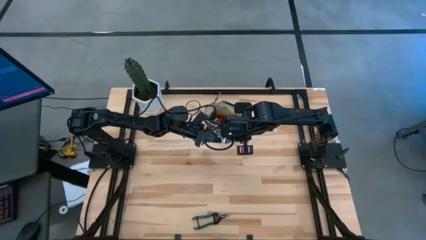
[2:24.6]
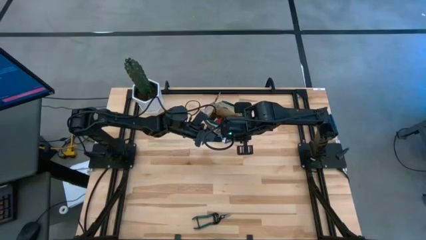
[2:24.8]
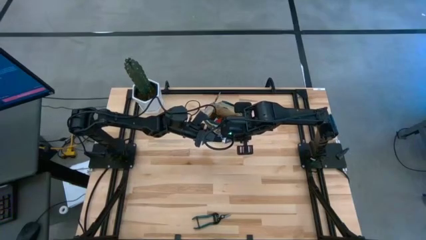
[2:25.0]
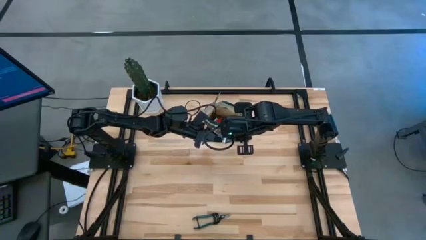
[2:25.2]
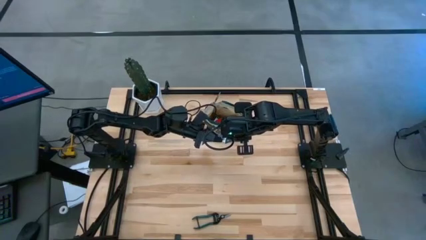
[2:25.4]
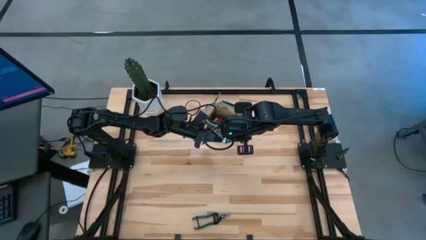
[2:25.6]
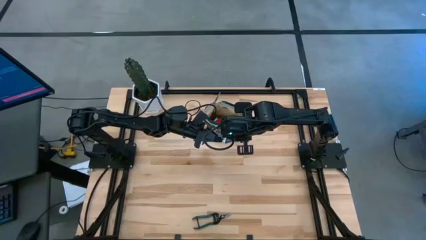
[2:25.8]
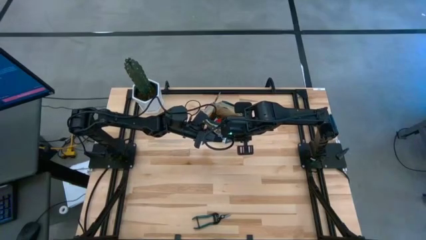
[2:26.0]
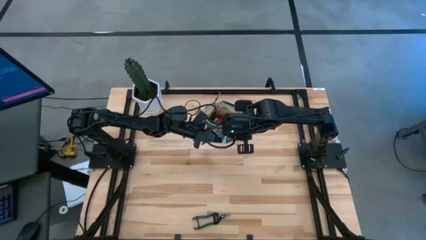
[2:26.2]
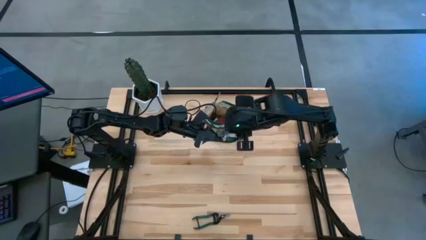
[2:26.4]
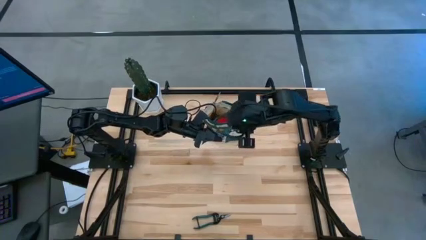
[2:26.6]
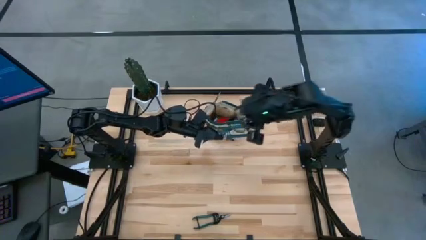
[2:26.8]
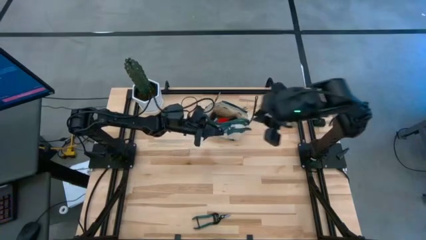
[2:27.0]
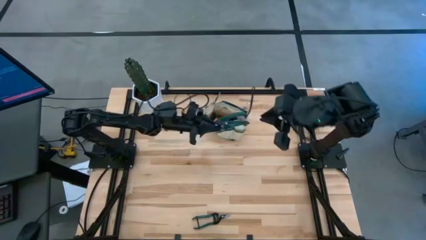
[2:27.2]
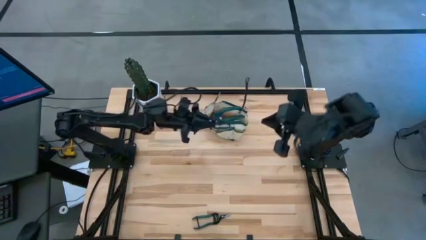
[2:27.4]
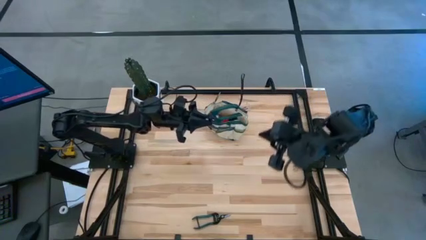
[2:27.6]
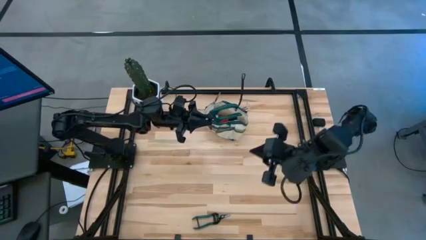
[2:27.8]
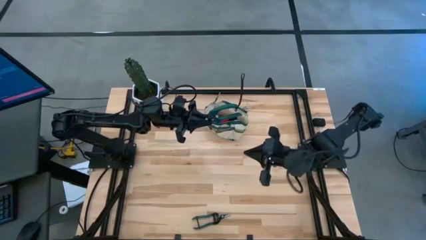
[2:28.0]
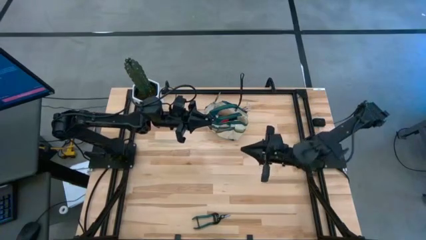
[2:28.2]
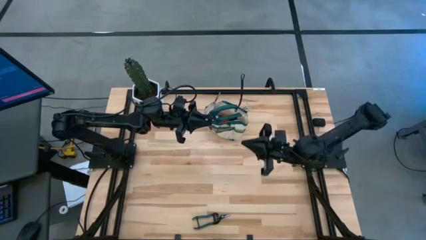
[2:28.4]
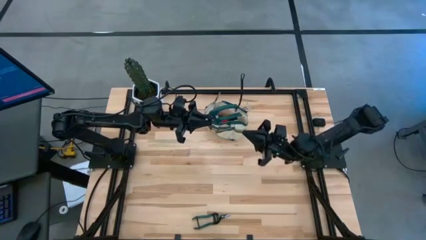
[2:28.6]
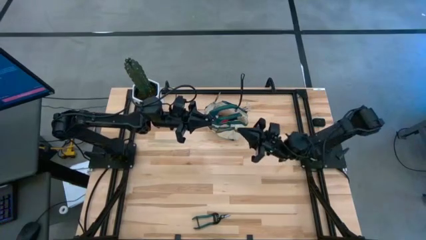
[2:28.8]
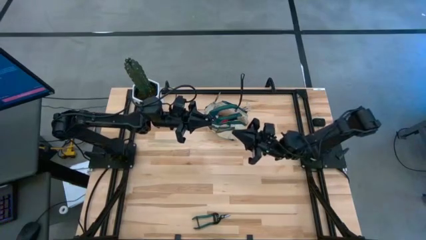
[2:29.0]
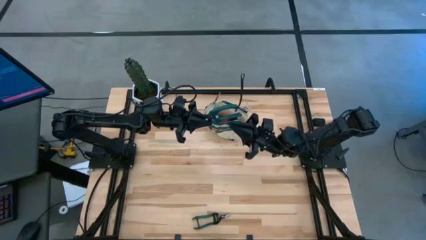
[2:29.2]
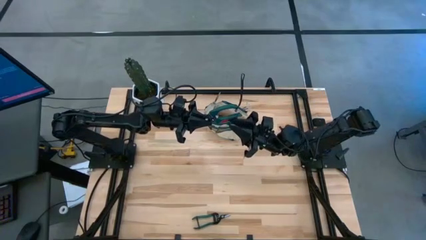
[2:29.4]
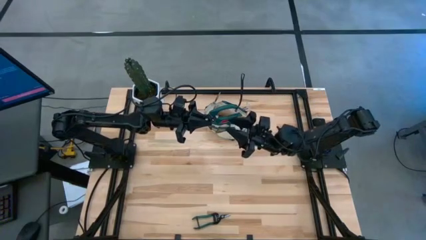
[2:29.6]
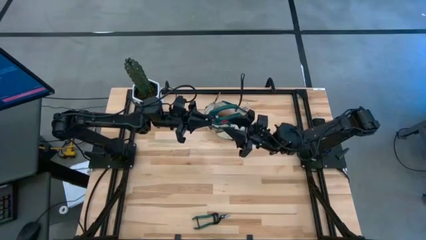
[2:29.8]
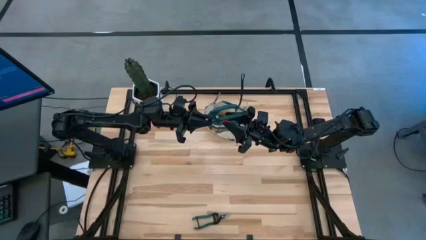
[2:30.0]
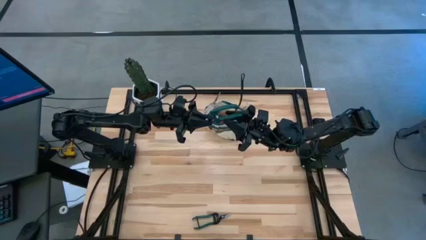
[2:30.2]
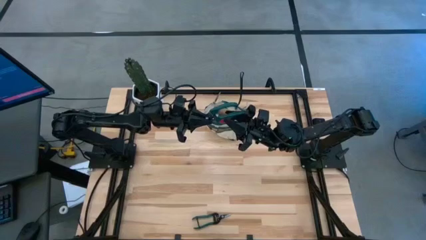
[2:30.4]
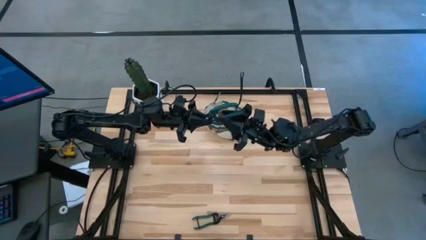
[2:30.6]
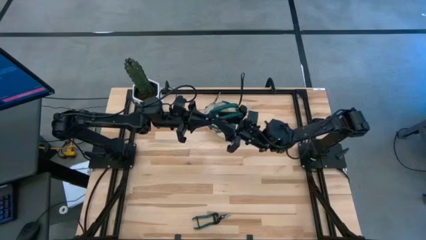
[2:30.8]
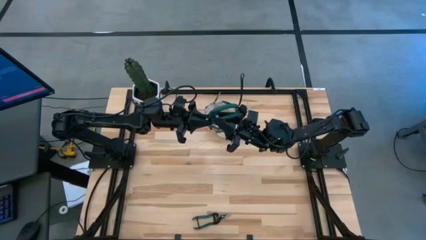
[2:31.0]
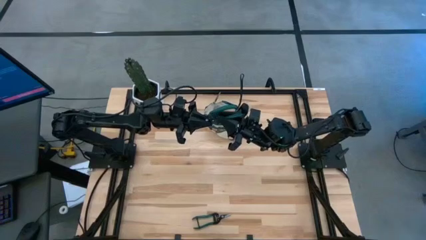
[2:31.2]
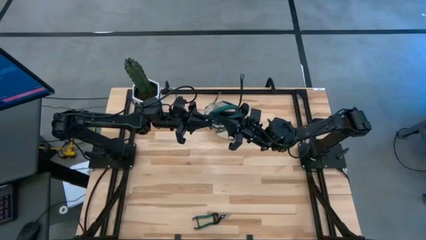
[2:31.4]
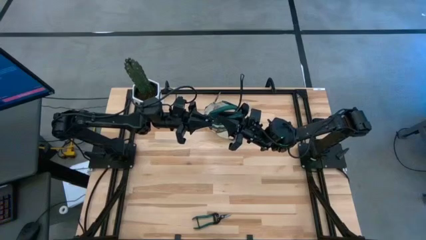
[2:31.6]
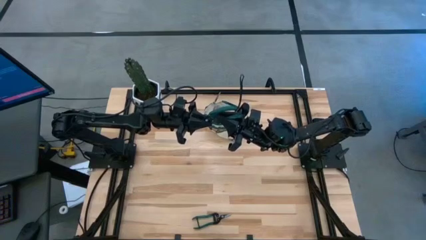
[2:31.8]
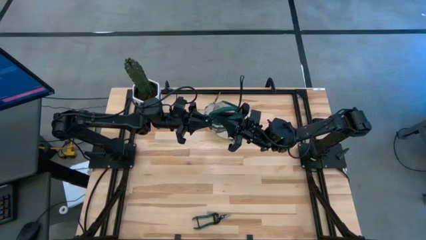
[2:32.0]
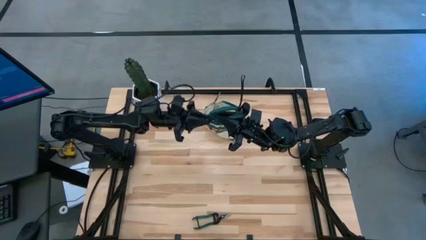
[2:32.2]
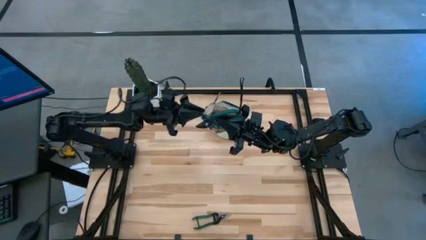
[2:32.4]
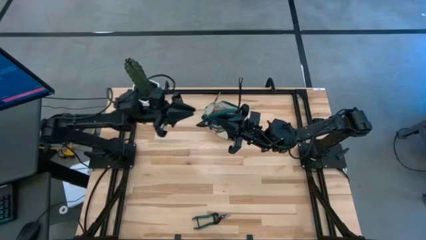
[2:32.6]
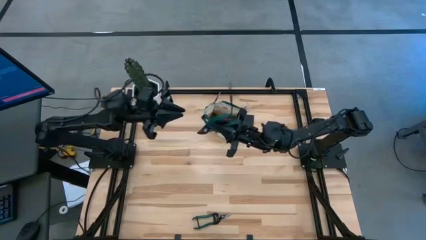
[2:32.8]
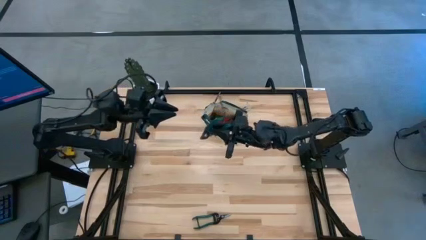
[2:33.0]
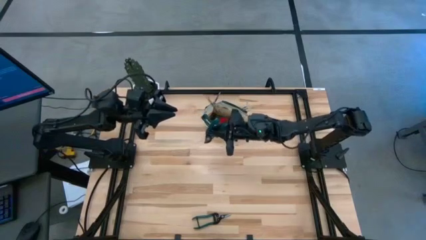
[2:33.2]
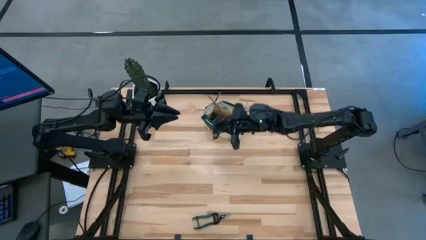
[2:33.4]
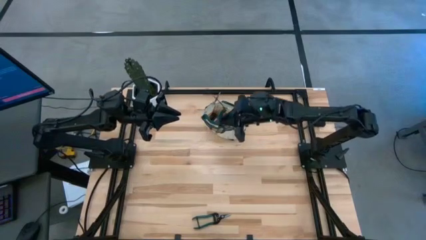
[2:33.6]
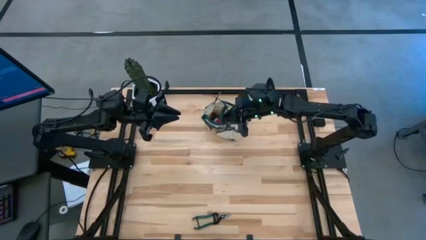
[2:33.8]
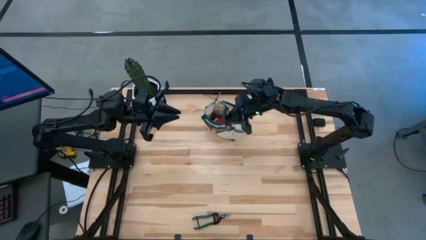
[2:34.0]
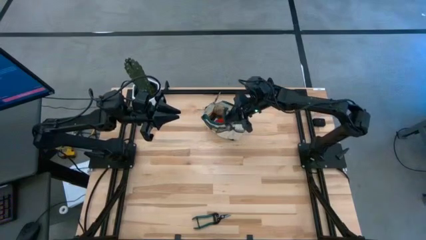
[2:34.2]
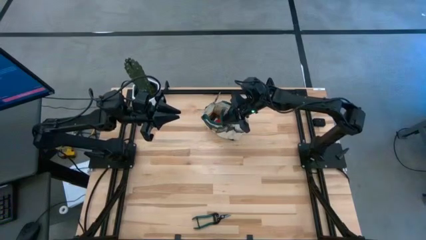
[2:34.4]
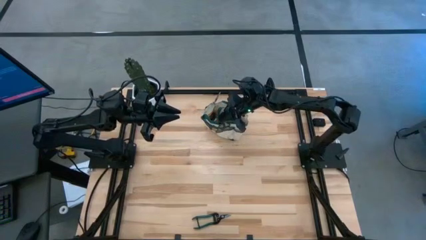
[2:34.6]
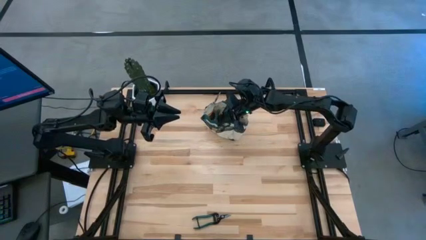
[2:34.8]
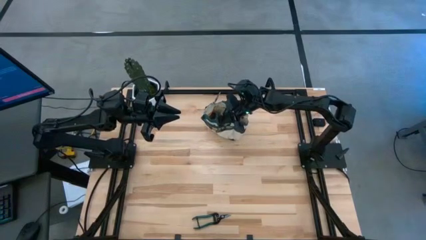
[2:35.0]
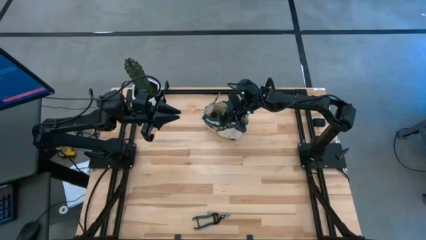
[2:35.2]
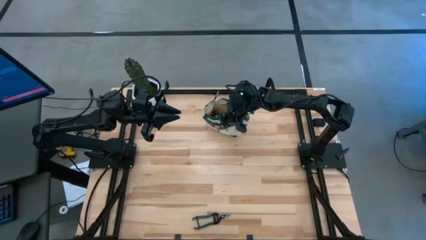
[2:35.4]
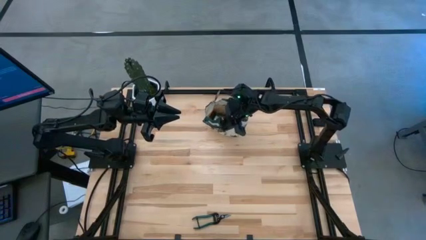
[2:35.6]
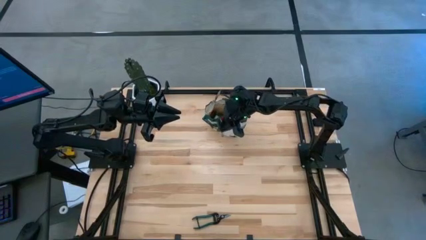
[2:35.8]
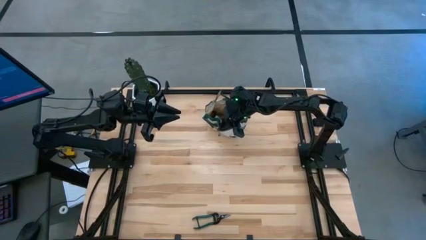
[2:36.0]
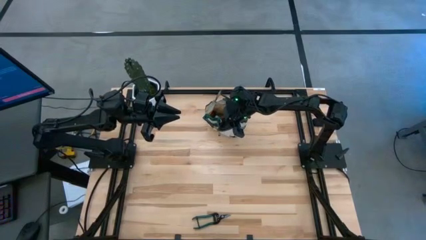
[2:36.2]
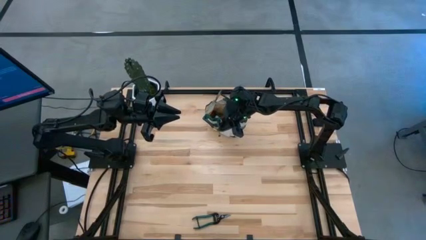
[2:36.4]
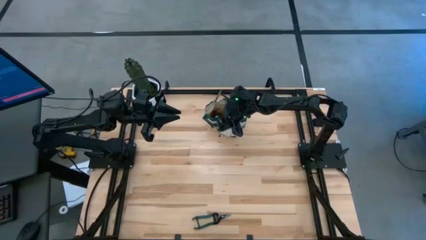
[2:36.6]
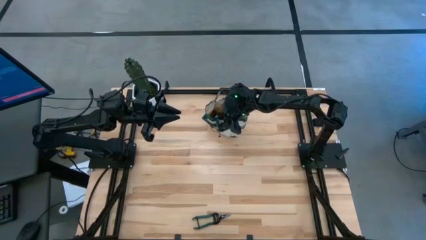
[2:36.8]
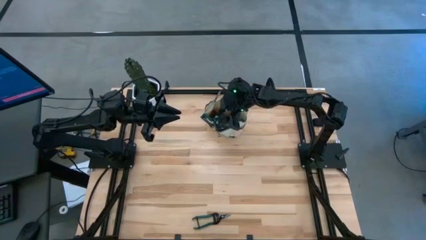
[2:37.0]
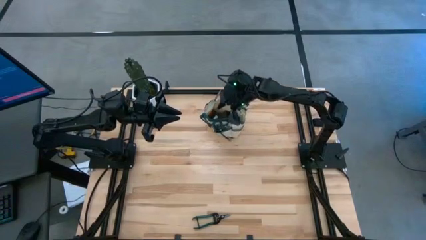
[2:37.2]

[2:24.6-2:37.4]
Task: Pick & Place Garden tools in Gardening bag
Put the shear scissor into the side pocket of the gardening bag
